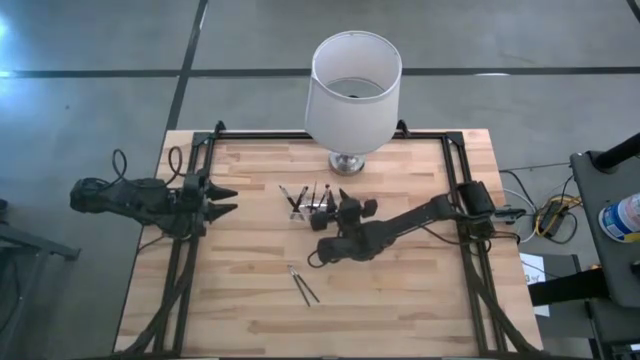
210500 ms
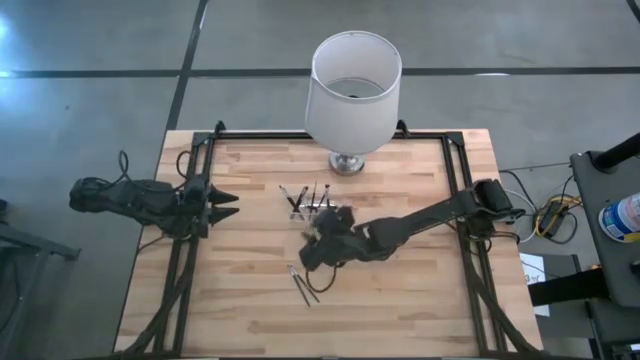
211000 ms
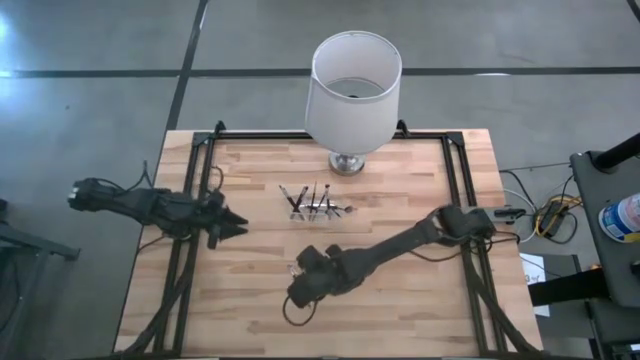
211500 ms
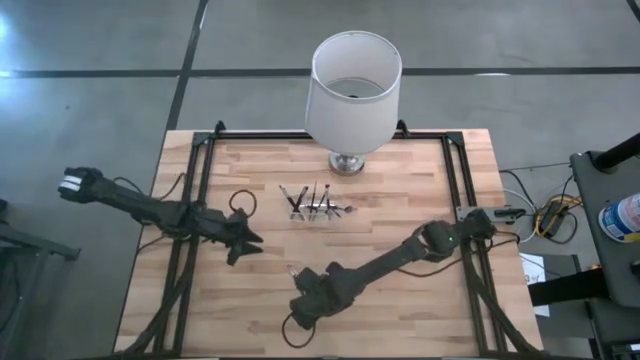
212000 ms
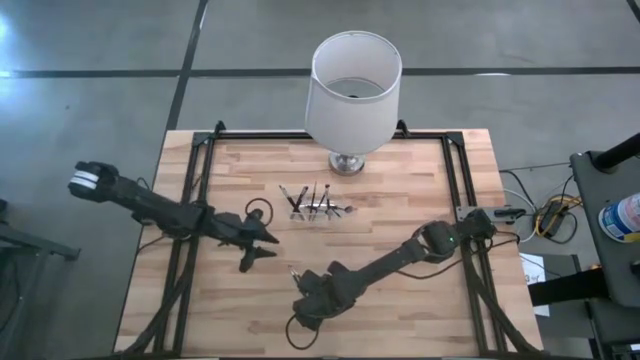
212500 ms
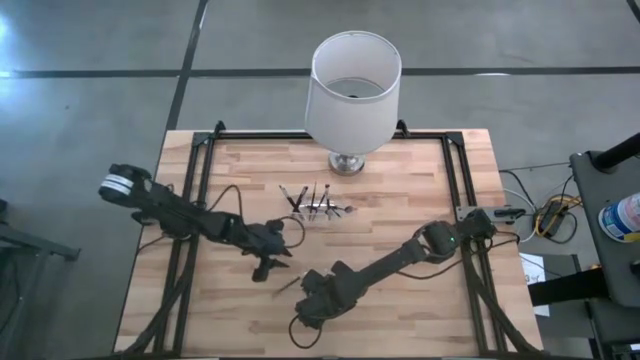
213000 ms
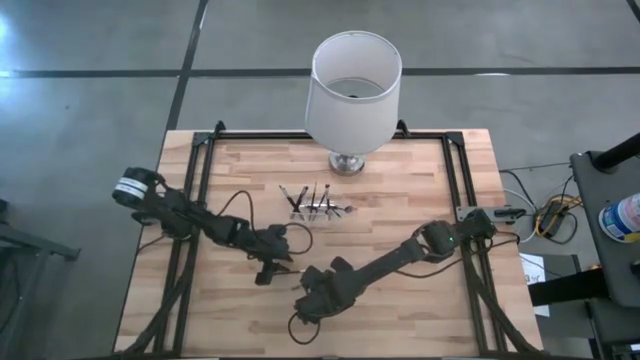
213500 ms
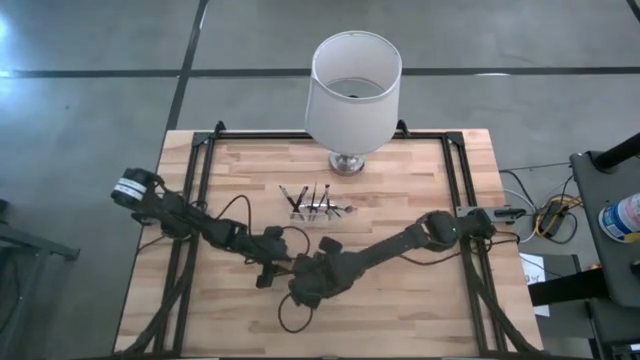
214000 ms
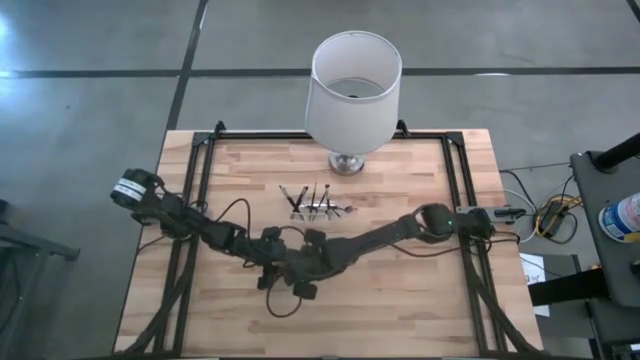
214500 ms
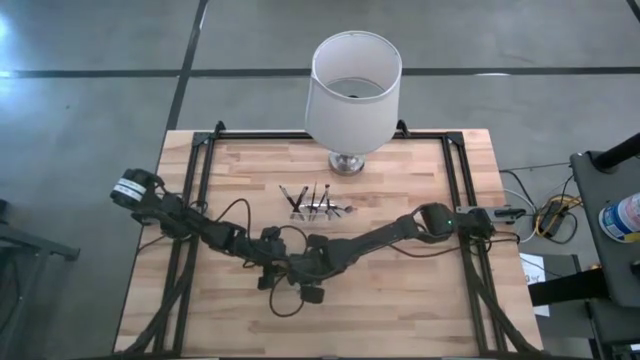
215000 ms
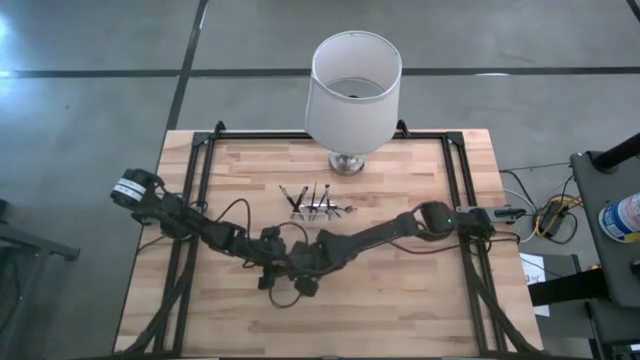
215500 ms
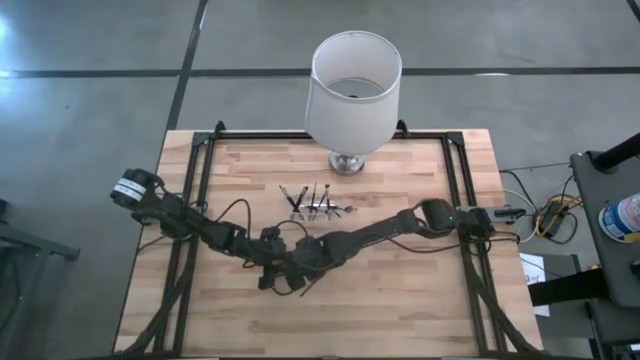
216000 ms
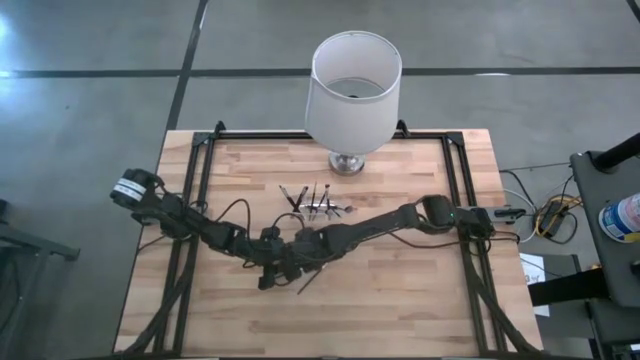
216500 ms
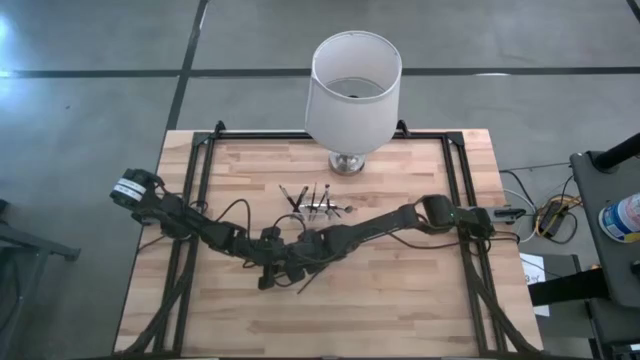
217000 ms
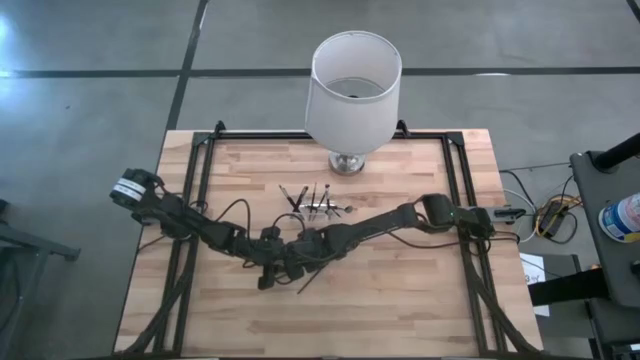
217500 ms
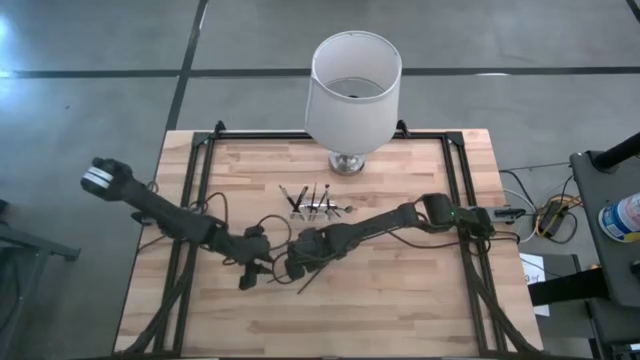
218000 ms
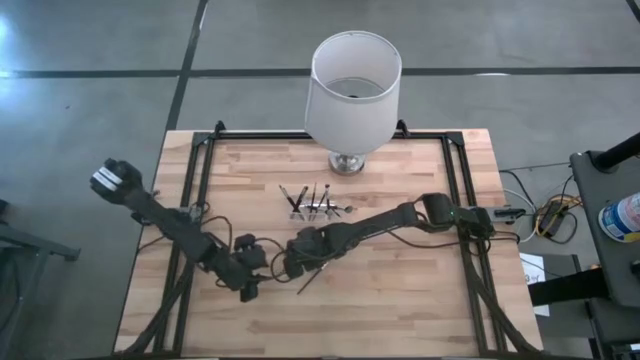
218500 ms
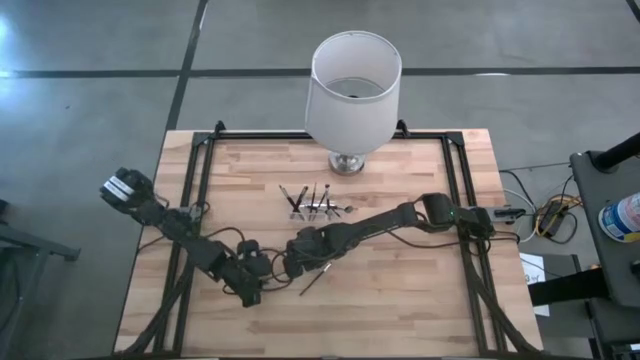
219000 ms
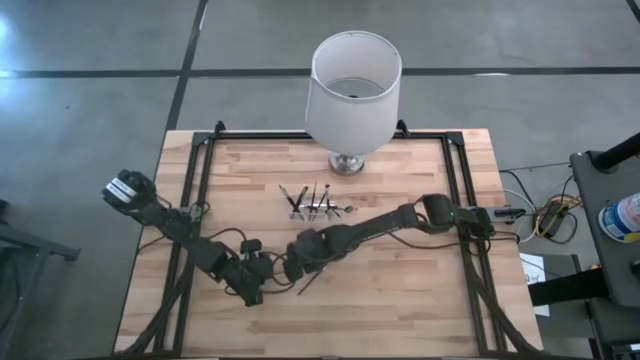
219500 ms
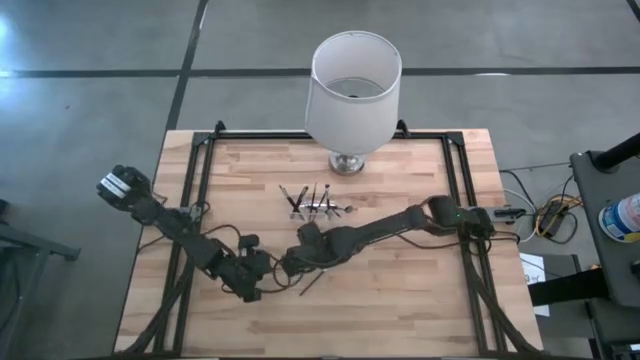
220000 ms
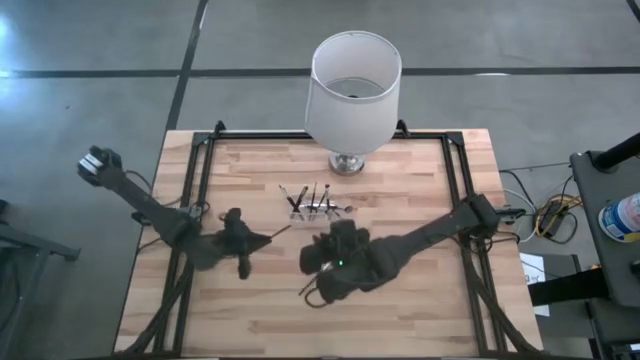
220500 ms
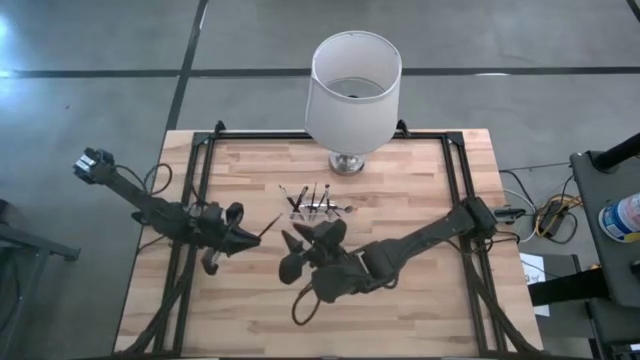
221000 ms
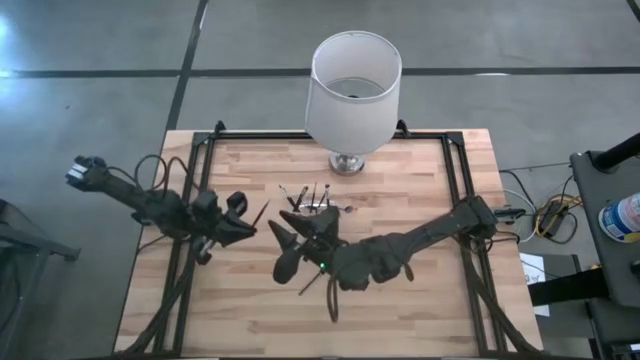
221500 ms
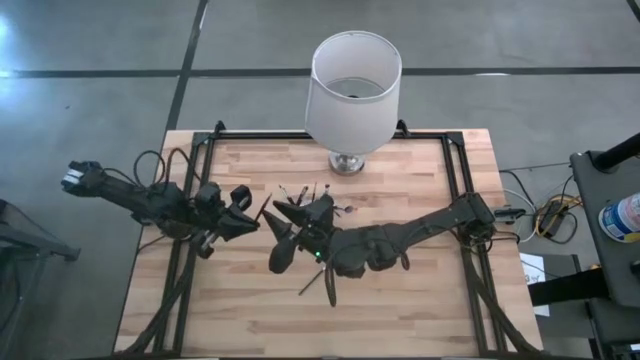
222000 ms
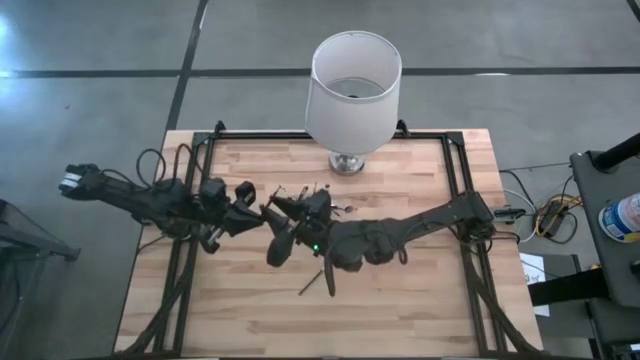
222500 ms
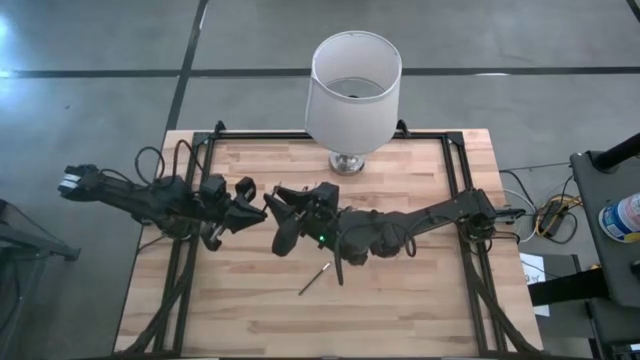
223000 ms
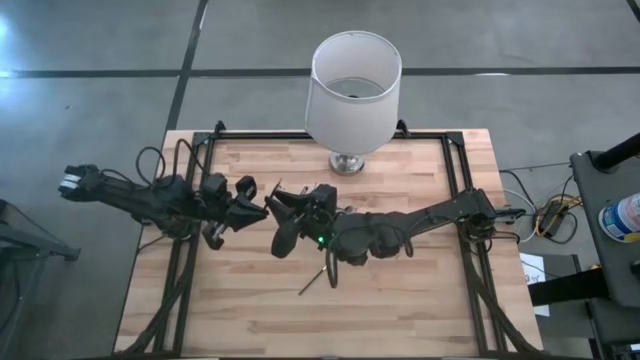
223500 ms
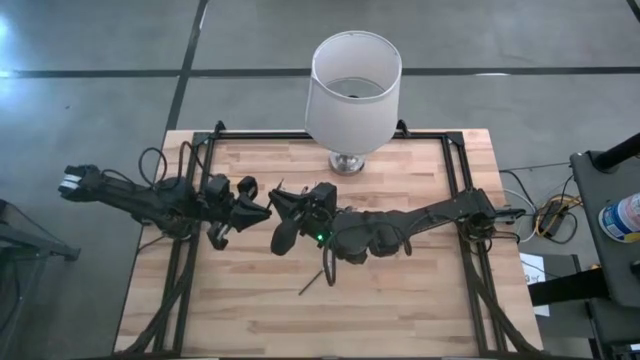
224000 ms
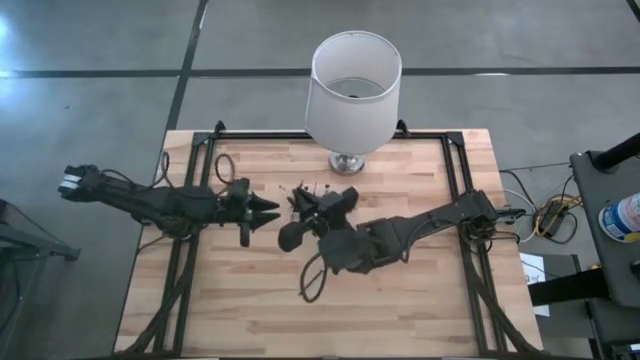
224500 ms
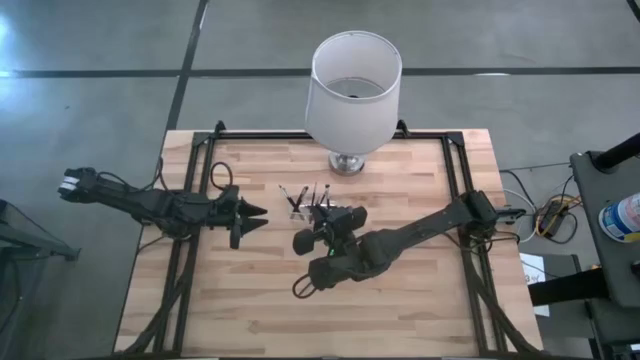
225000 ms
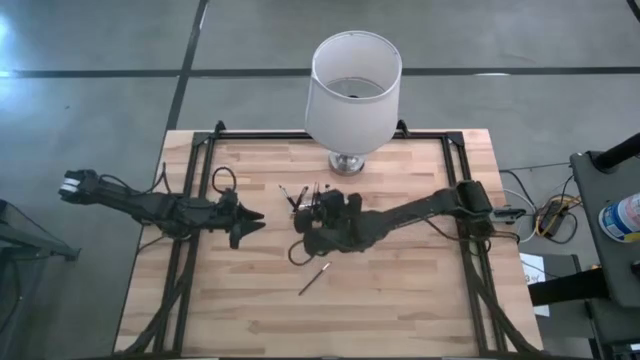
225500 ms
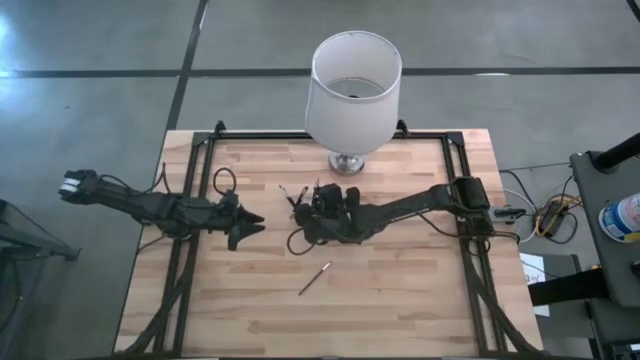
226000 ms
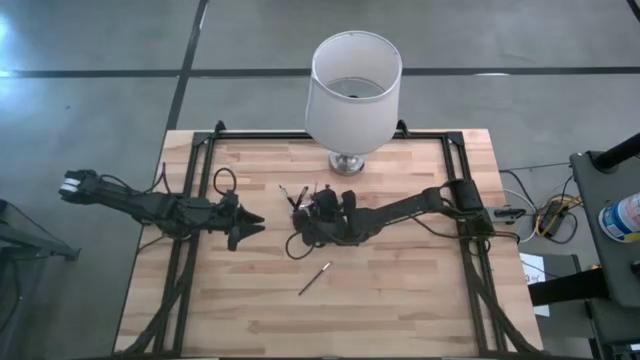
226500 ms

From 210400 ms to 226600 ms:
Task: Put items in baskets/containers
Put the eyeshadow brush into the transparent organizer

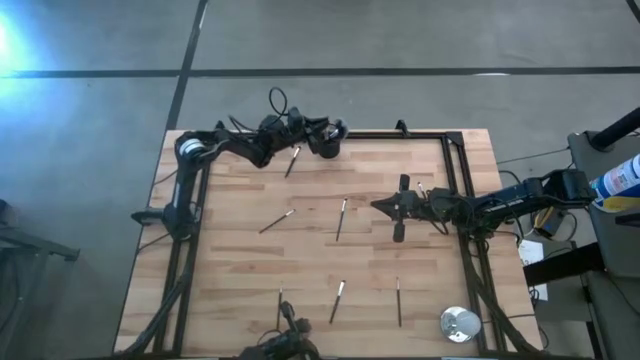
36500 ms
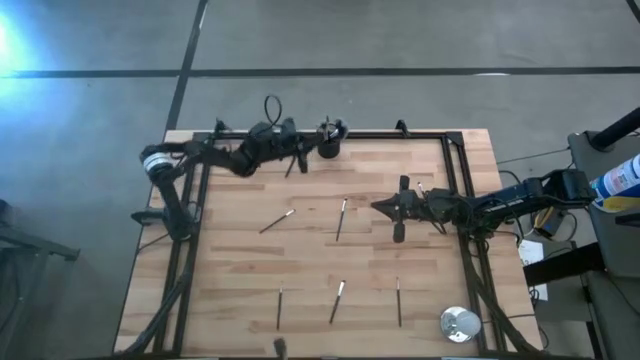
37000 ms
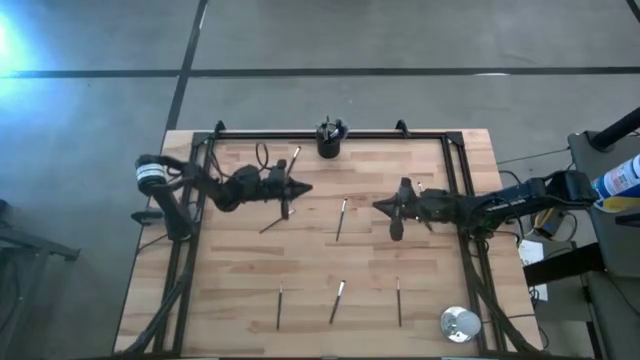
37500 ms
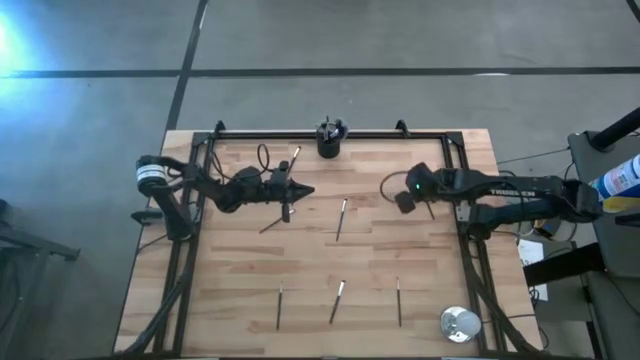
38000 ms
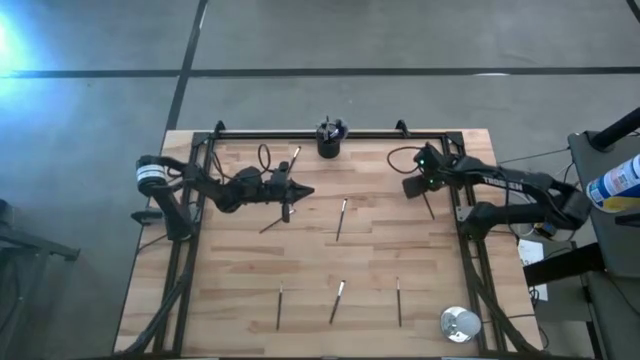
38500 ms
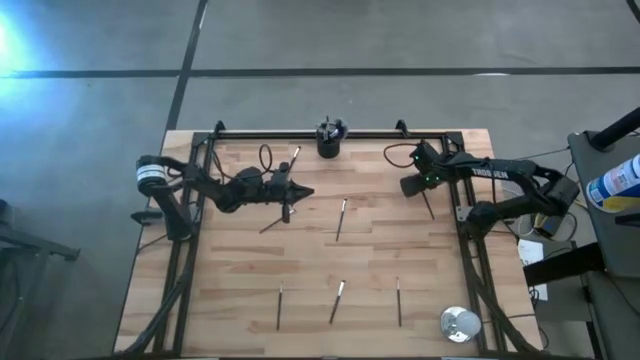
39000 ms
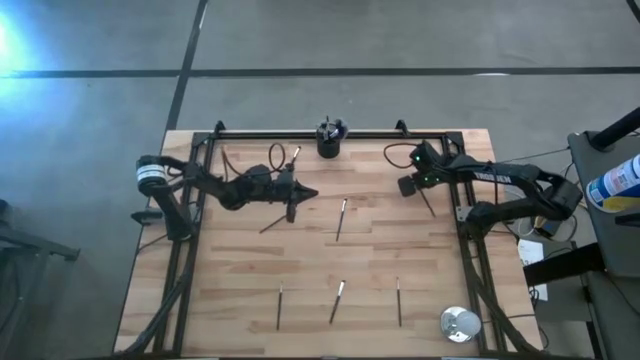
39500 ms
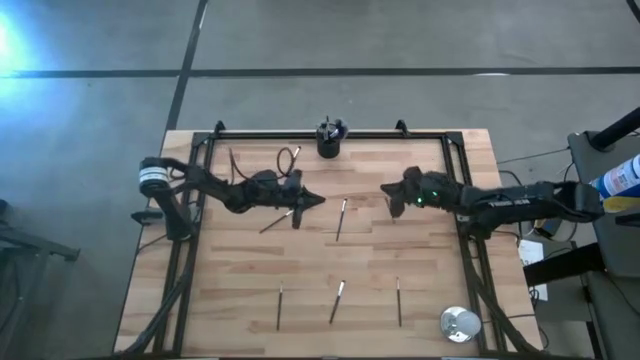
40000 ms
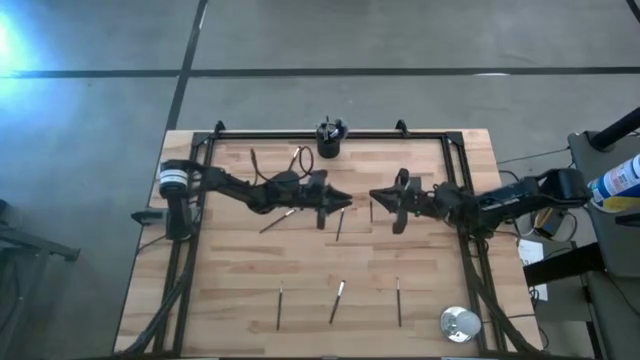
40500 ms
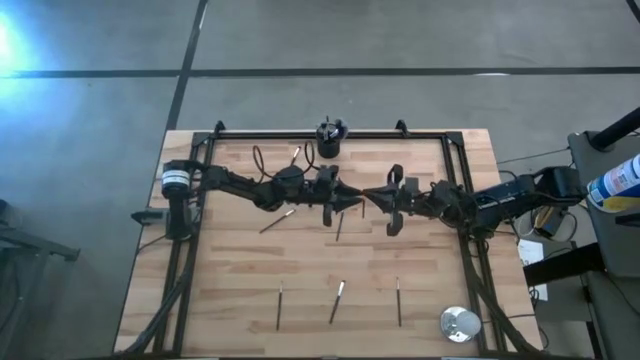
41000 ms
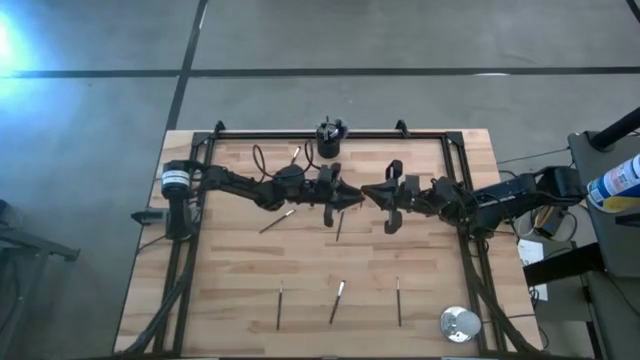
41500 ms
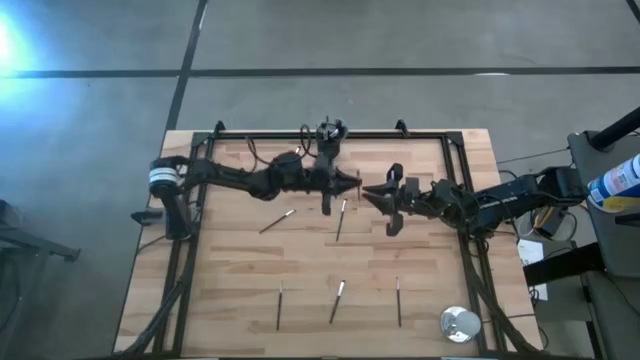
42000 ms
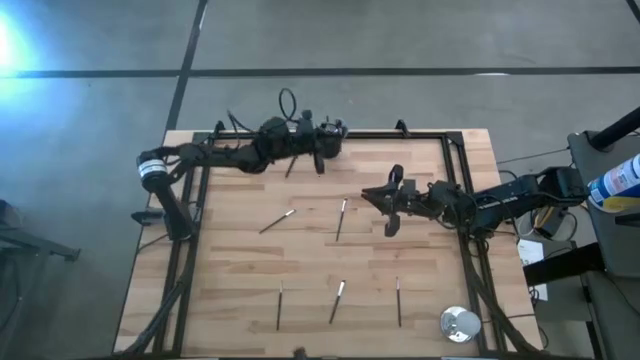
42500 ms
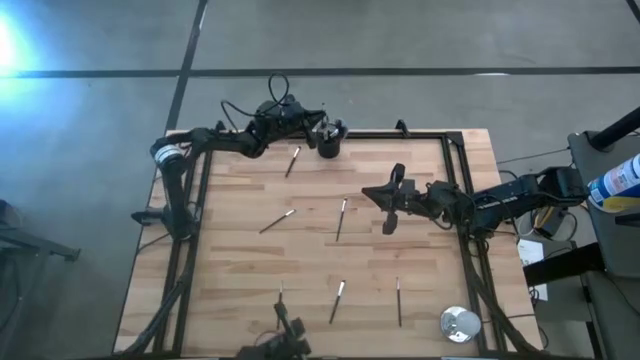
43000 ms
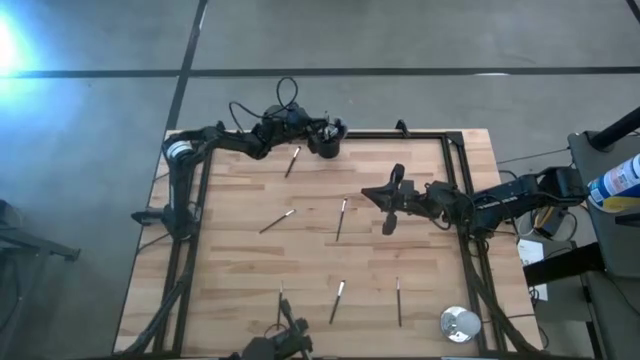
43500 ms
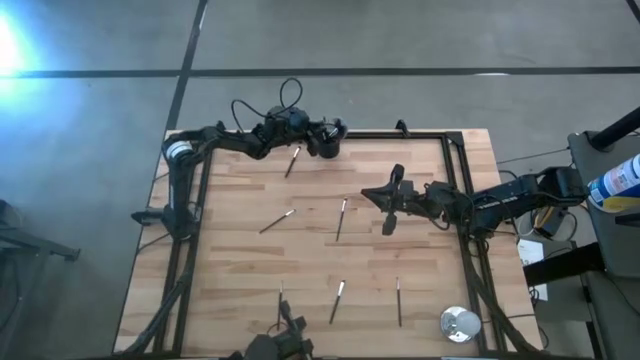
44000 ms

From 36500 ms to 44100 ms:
Task: Put items in baskets/containers
Put the black eyeshadow brush into the black pen holder
